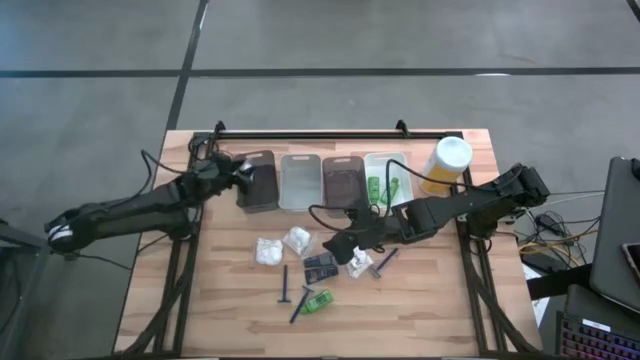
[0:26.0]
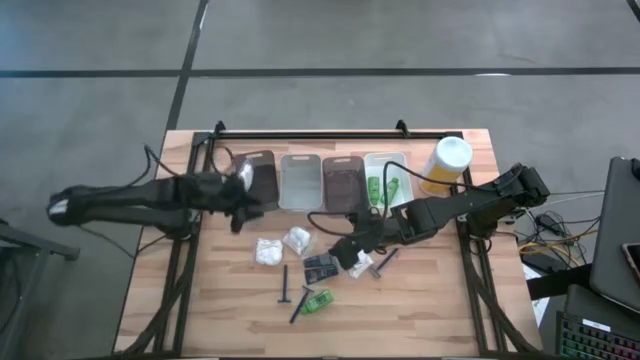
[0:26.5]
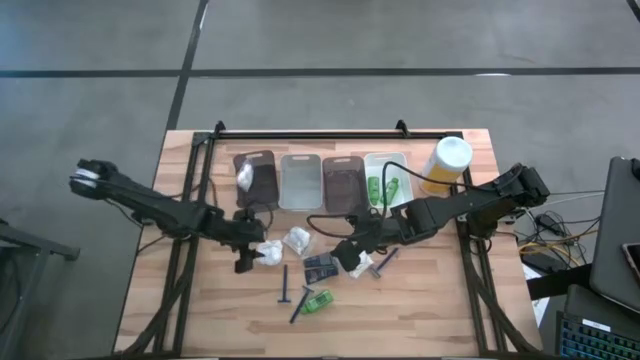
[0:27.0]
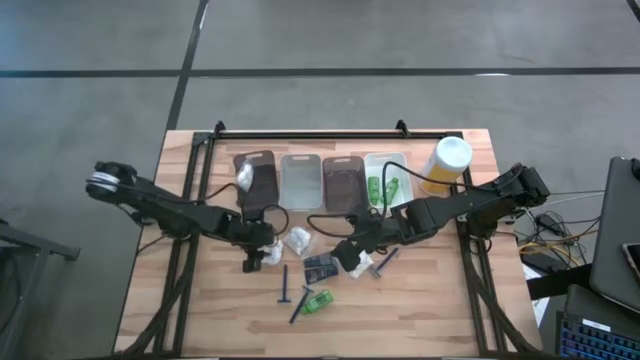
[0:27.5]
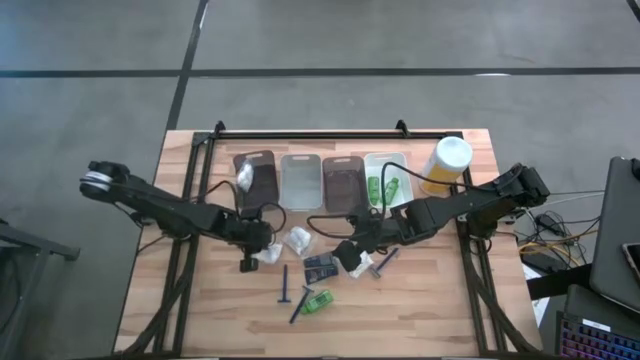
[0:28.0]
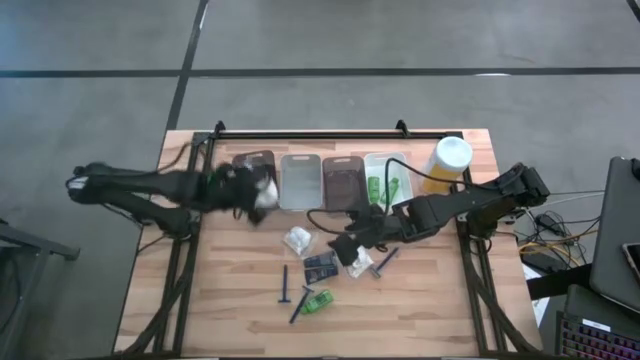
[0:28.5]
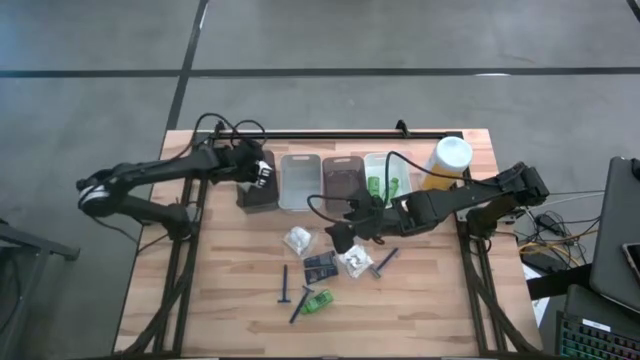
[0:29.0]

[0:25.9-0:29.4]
Task: Pick & Place Travel size toiletries
Put the white cotton pack into the left black bin

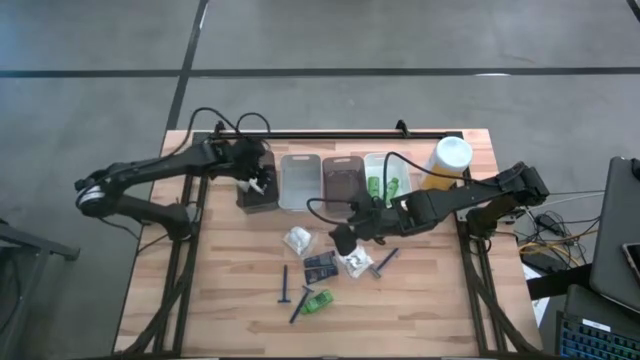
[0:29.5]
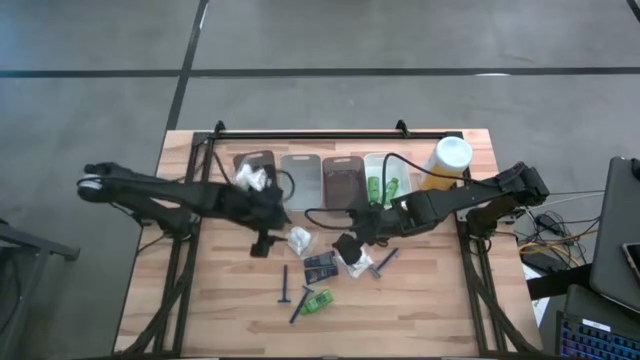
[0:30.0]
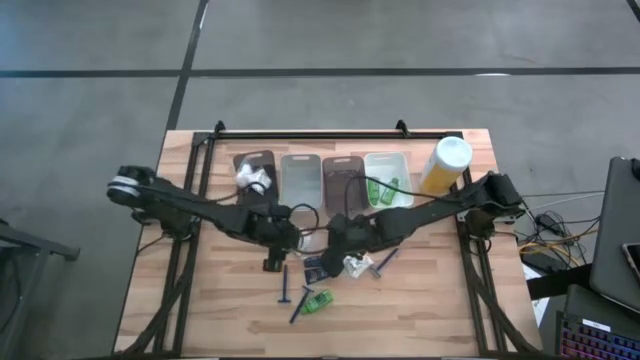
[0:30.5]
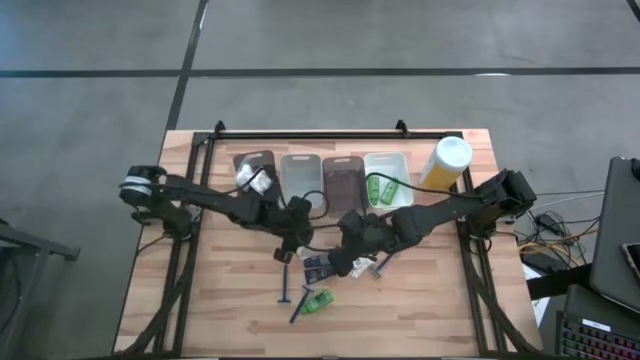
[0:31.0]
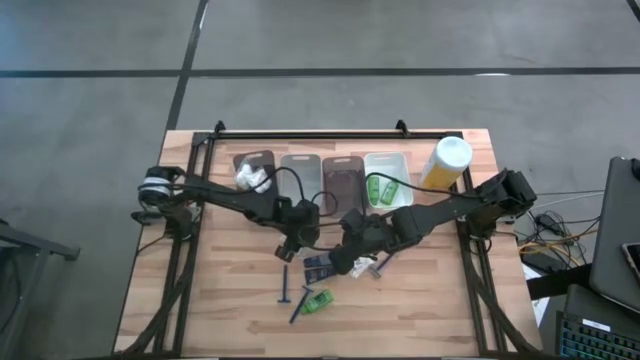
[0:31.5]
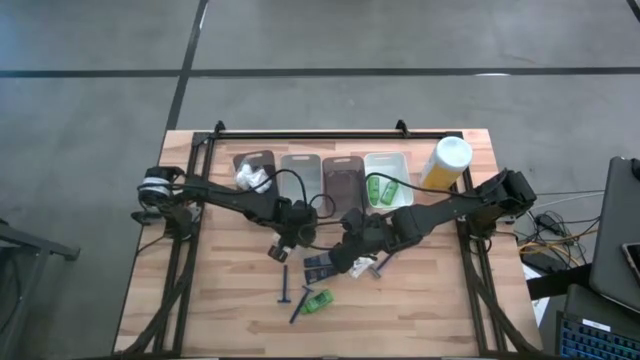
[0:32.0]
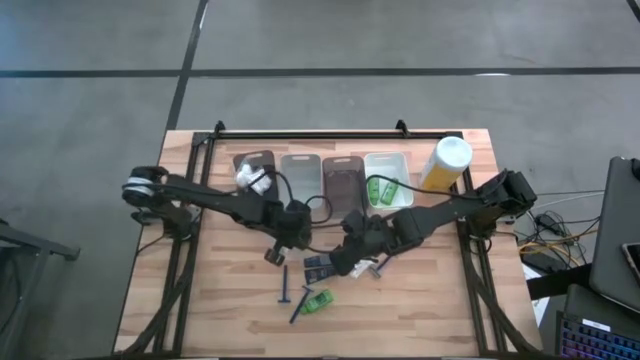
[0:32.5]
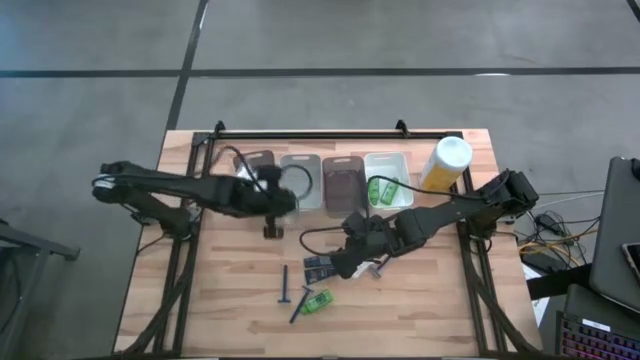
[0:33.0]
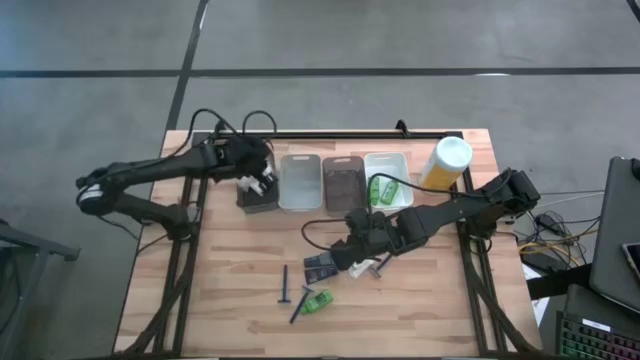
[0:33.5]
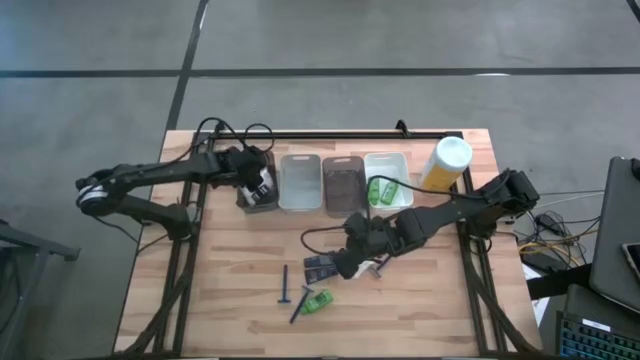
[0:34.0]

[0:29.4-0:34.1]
Put the white cotton pack into the left black bin

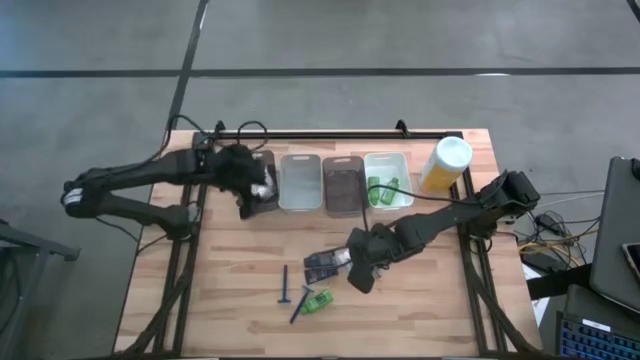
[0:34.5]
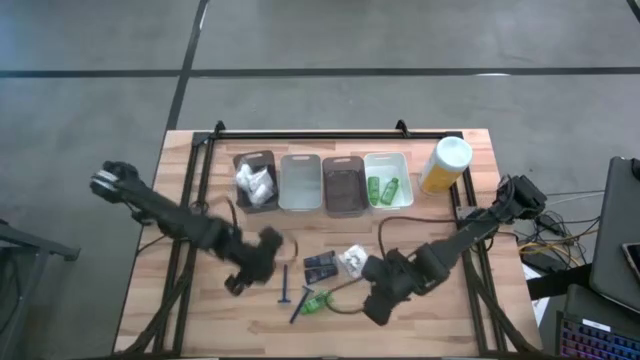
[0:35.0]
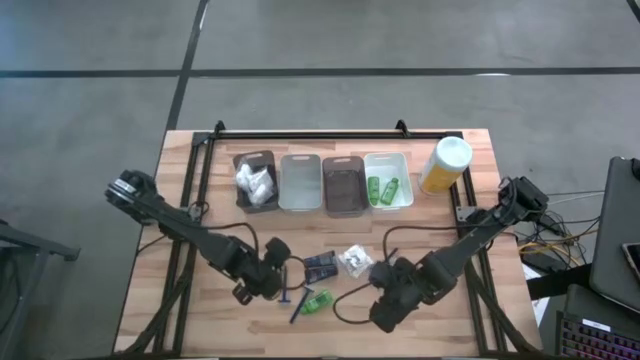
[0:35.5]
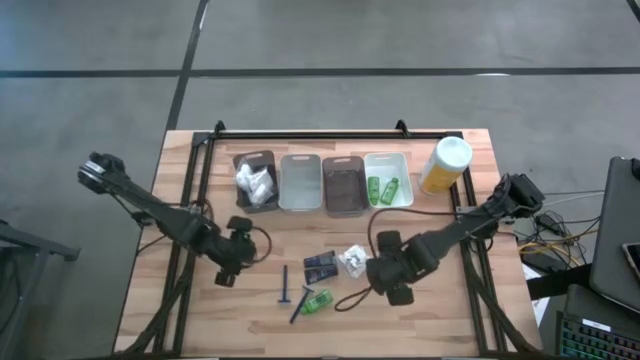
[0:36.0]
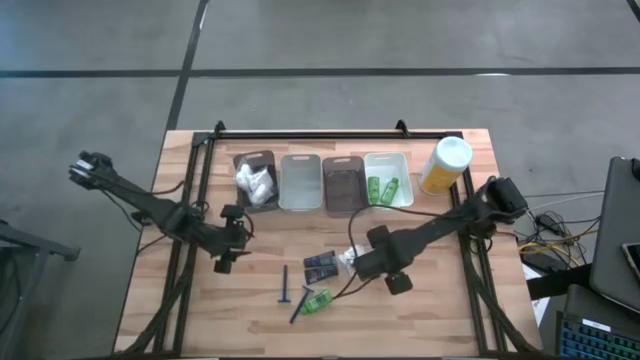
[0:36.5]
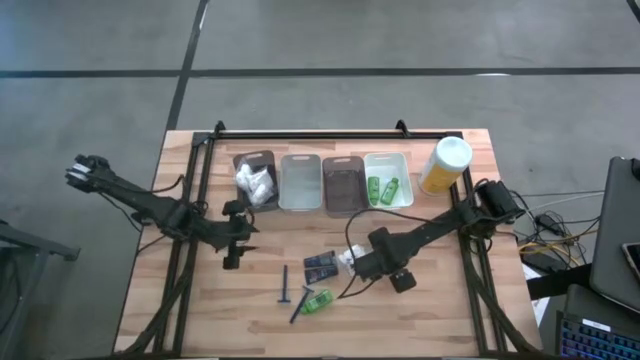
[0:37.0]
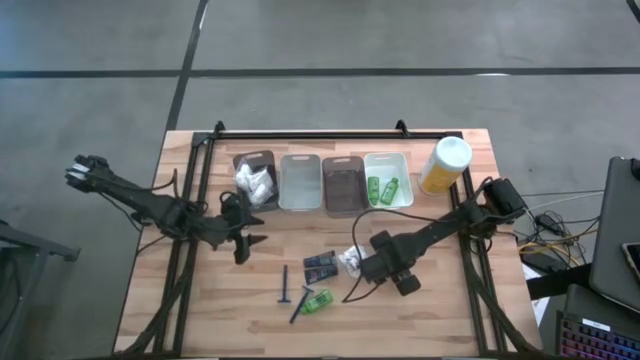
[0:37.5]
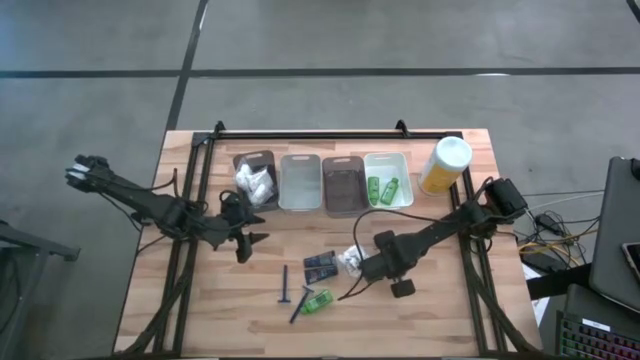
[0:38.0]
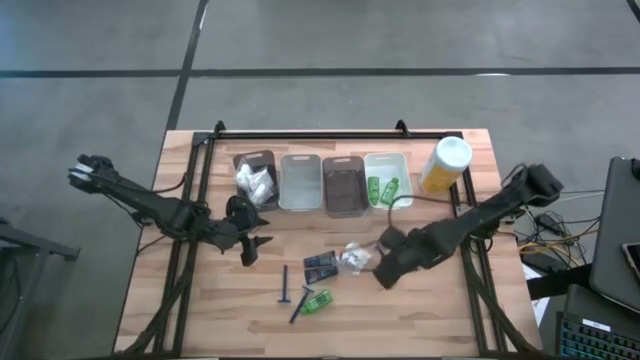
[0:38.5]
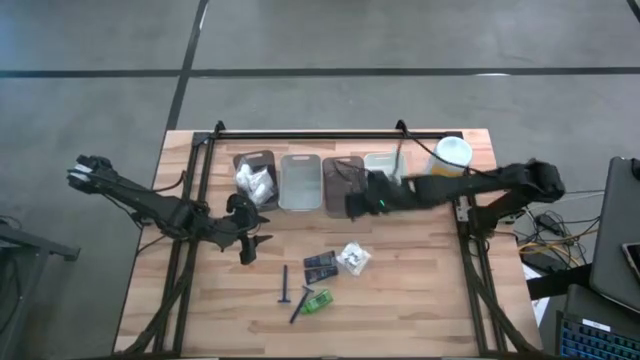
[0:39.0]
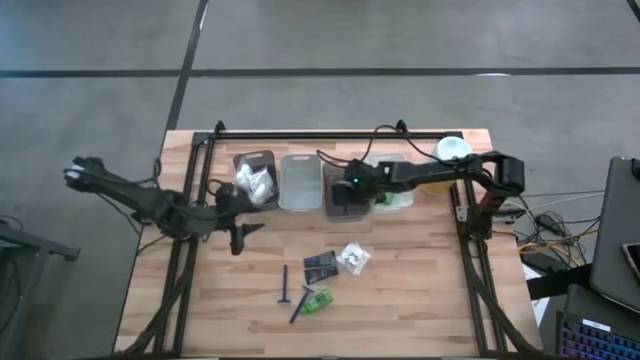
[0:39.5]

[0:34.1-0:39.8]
Put the blue razor into the right black bin

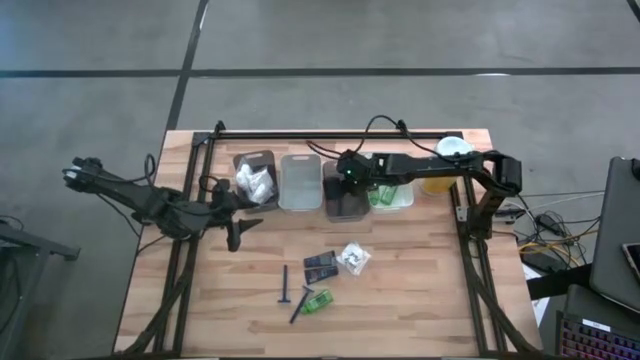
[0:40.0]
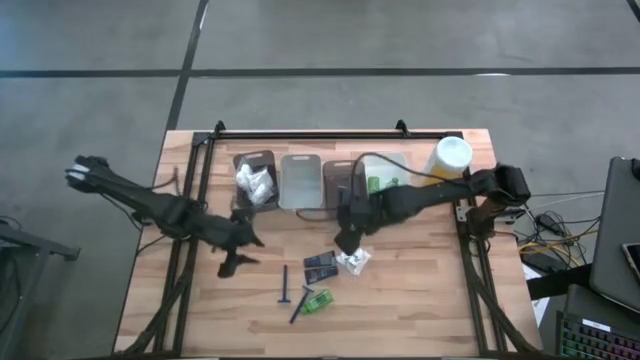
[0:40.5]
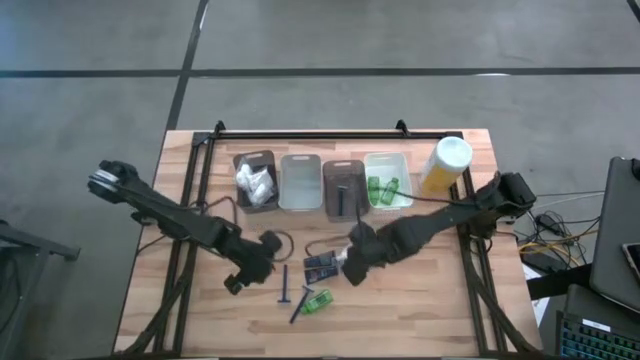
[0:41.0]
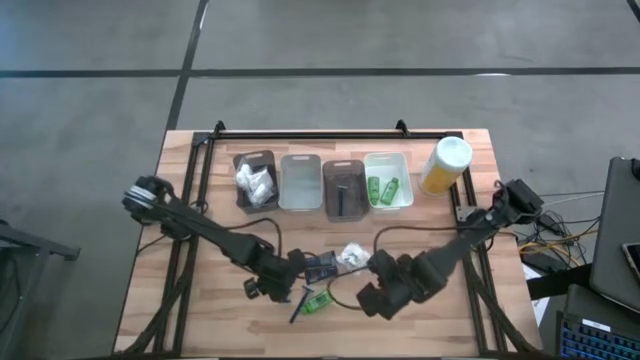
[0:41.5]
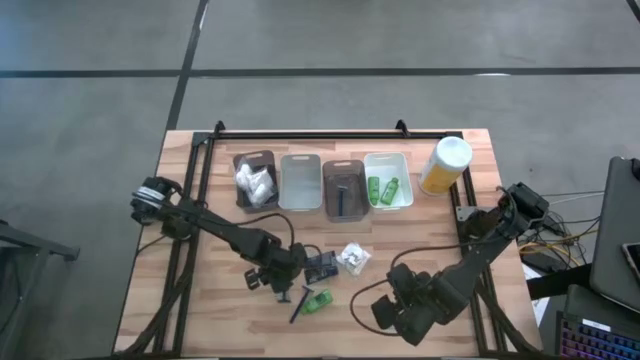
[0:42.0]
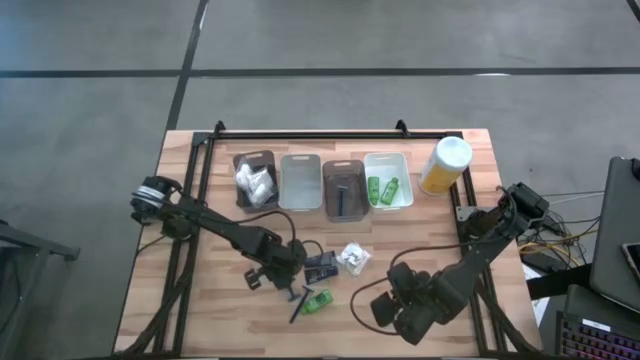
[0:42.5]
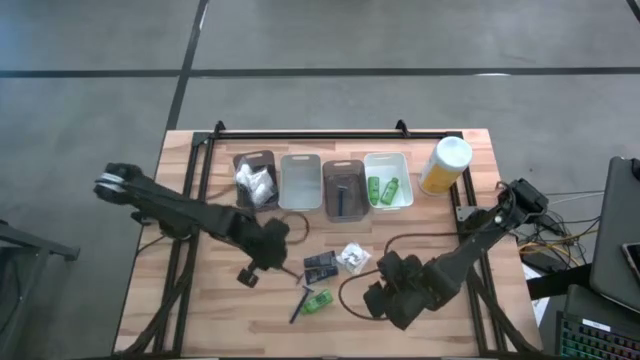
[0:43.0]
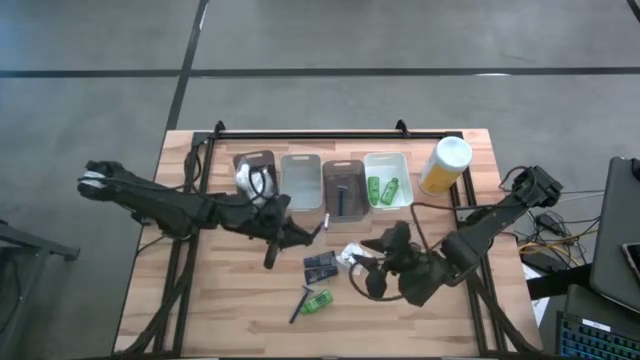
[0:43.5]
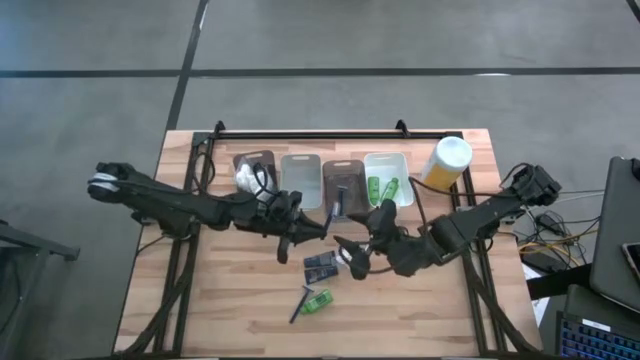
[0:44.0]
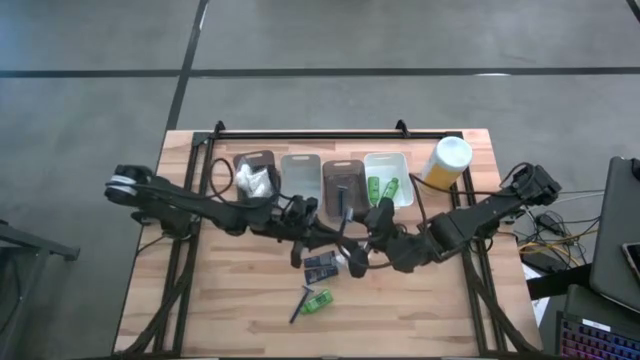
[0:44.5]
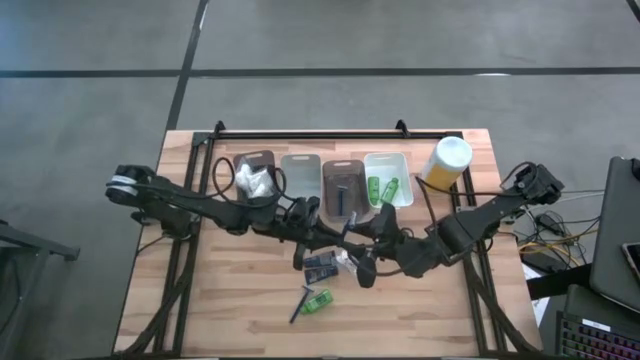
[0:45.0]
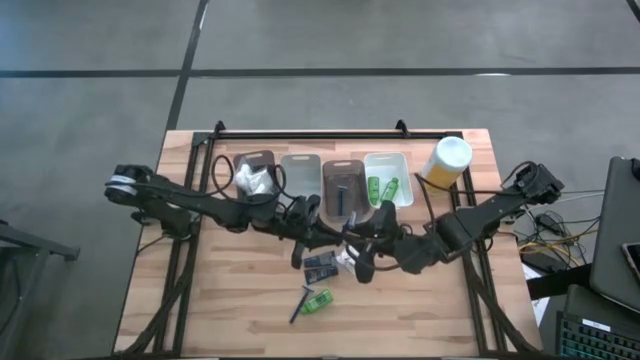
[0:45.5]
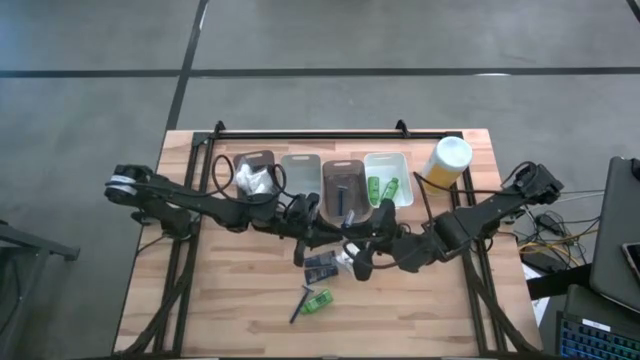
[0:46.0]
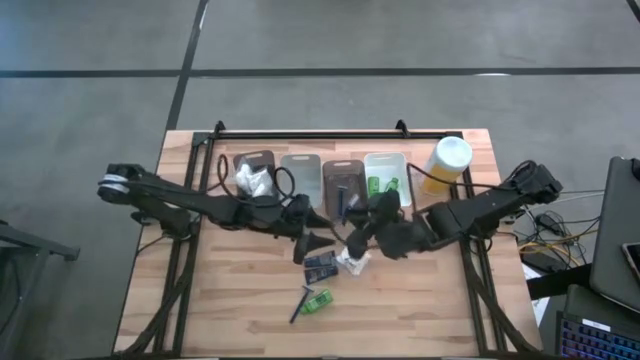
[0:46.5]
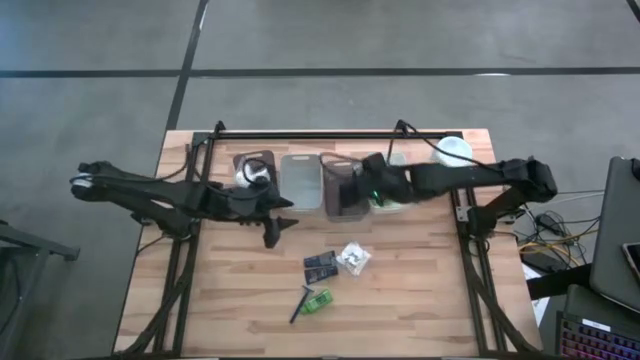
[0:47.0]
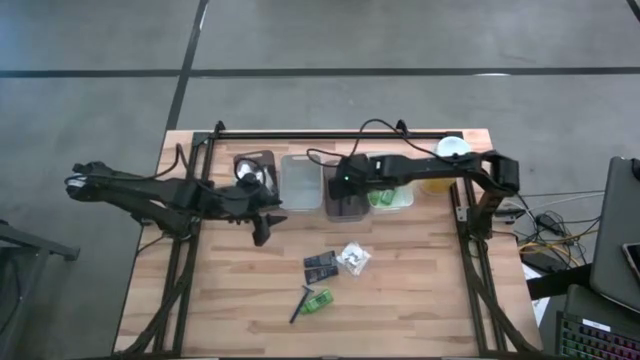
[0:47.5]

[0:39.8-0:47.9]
Put the blue razor into the right black bin
